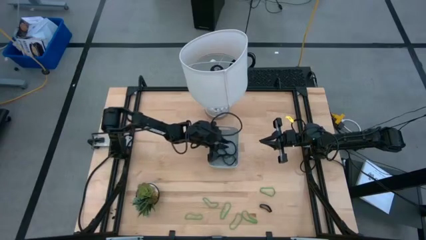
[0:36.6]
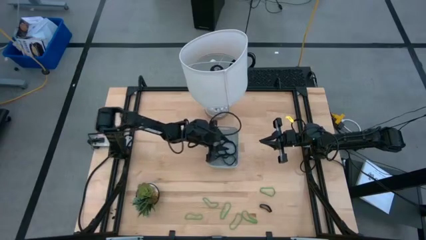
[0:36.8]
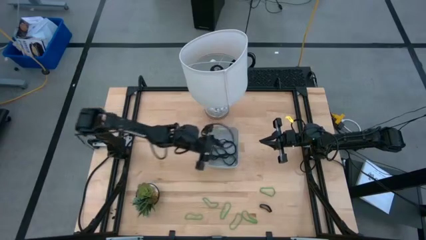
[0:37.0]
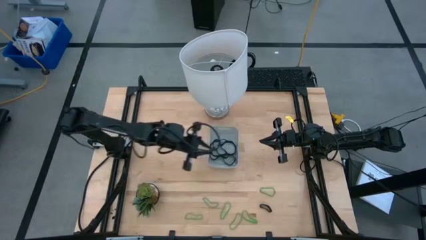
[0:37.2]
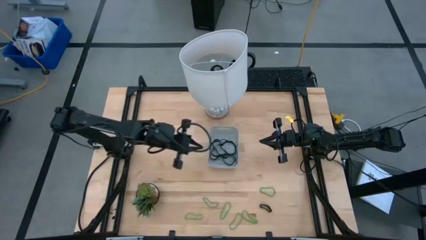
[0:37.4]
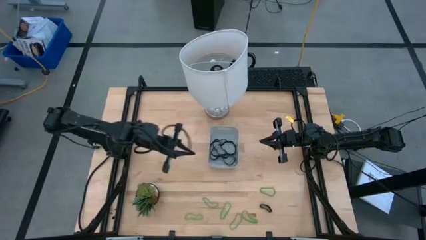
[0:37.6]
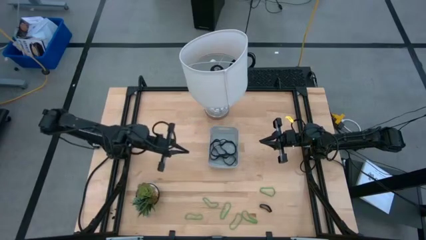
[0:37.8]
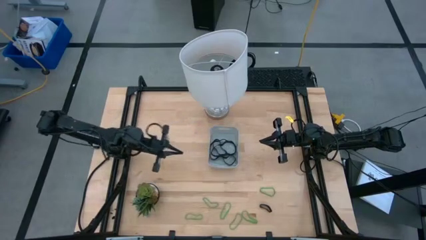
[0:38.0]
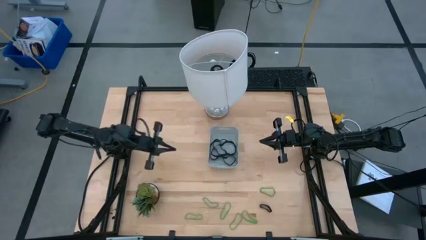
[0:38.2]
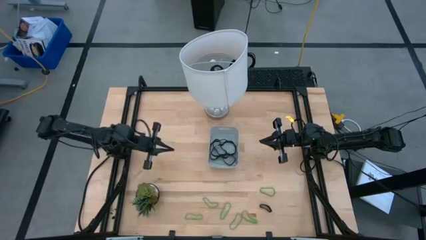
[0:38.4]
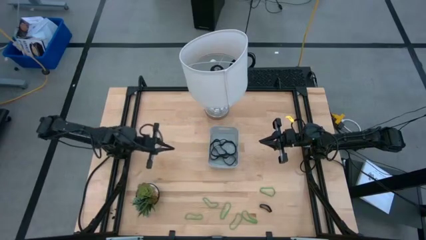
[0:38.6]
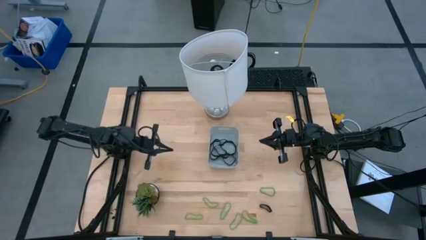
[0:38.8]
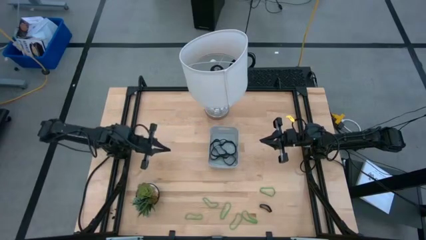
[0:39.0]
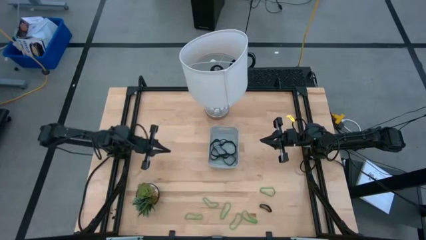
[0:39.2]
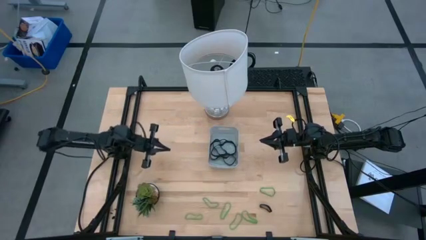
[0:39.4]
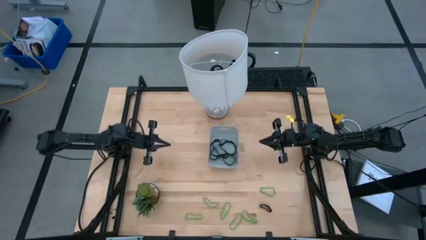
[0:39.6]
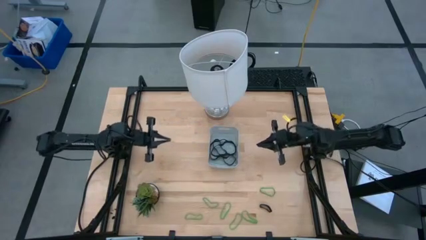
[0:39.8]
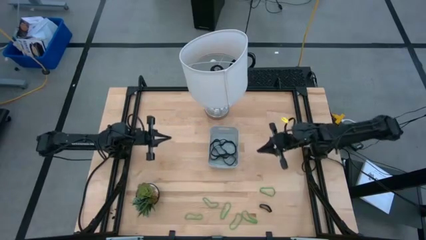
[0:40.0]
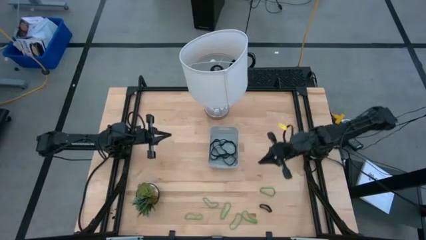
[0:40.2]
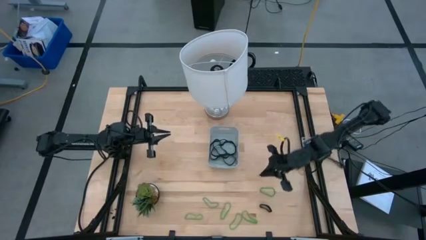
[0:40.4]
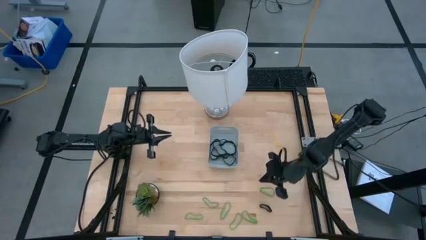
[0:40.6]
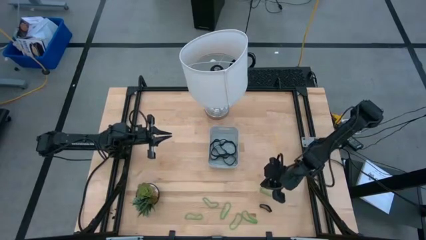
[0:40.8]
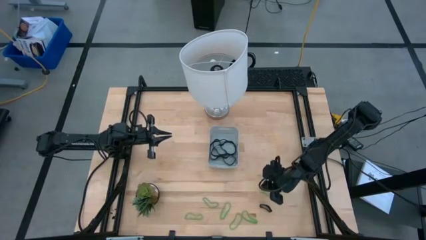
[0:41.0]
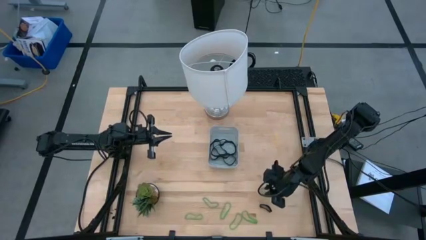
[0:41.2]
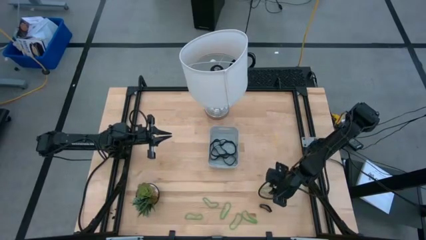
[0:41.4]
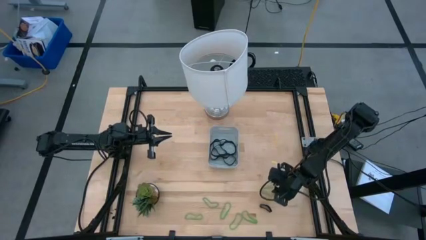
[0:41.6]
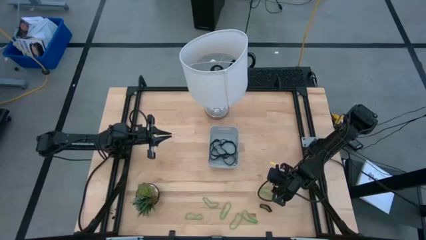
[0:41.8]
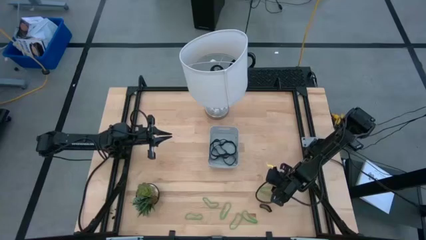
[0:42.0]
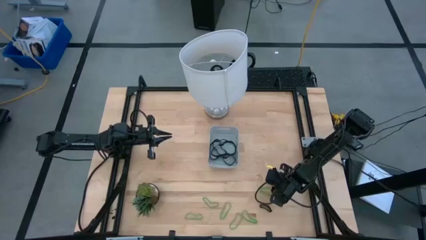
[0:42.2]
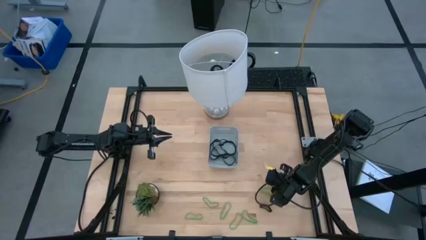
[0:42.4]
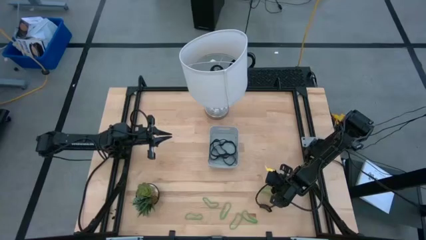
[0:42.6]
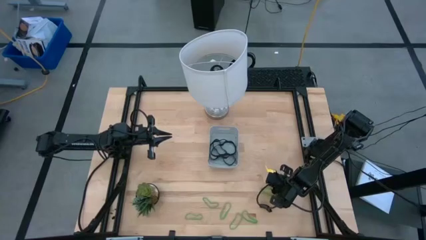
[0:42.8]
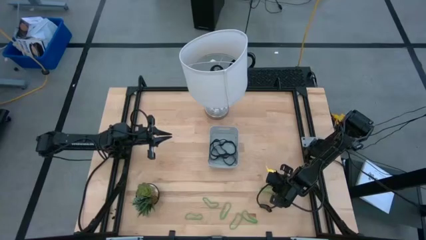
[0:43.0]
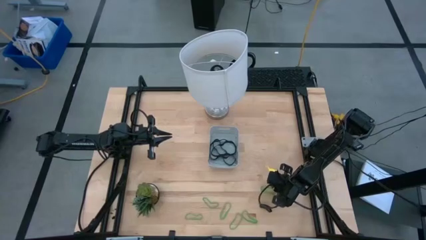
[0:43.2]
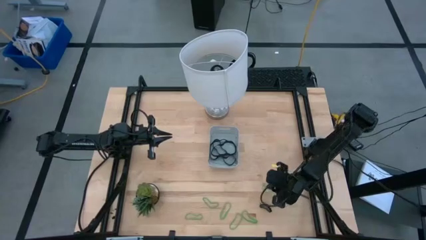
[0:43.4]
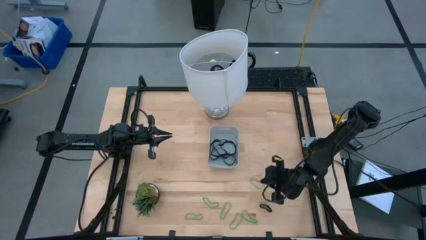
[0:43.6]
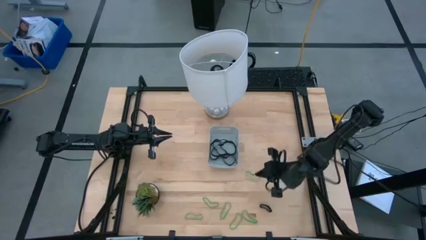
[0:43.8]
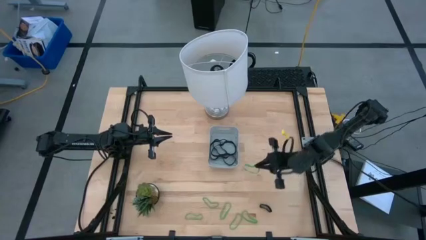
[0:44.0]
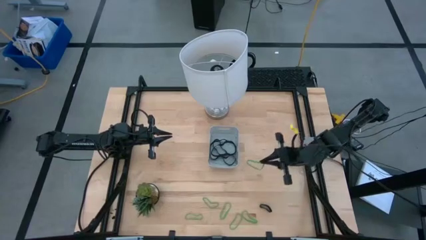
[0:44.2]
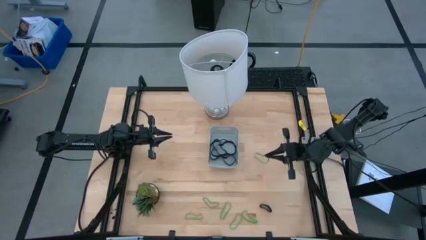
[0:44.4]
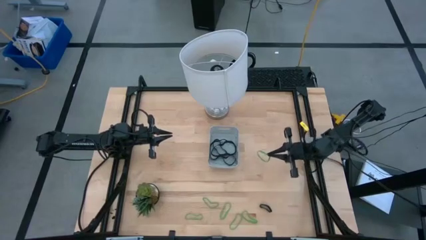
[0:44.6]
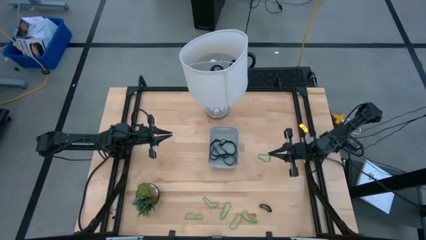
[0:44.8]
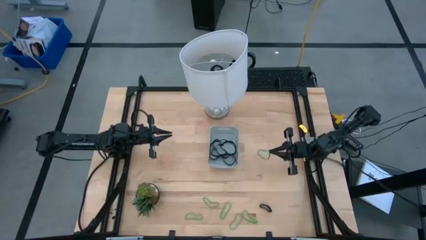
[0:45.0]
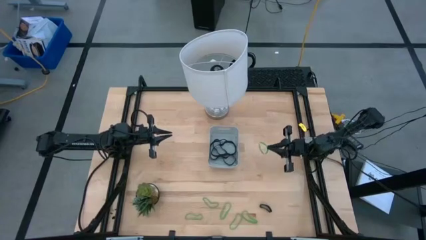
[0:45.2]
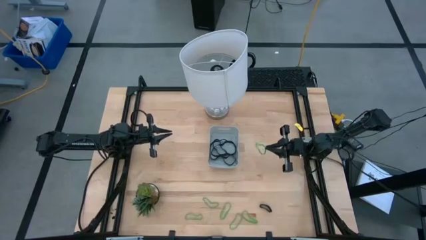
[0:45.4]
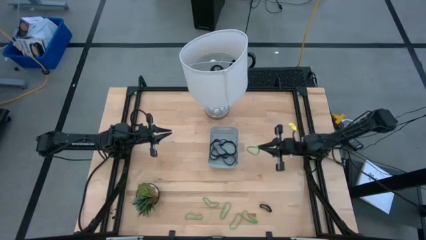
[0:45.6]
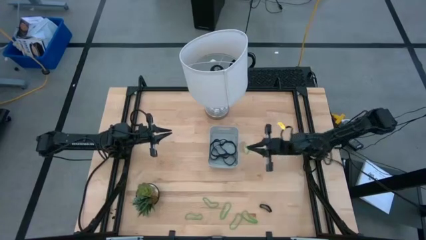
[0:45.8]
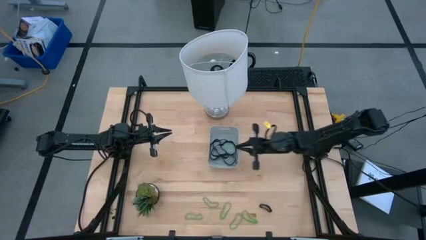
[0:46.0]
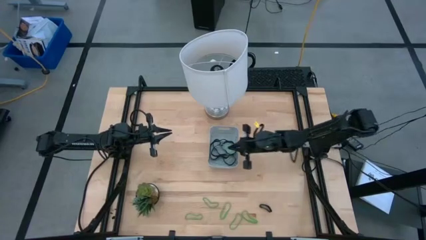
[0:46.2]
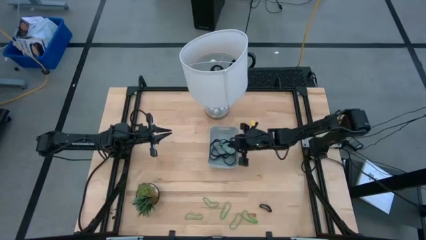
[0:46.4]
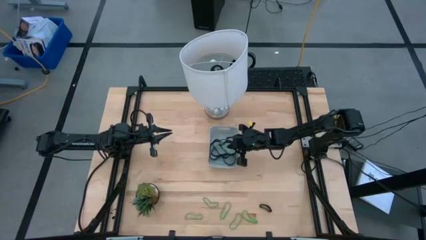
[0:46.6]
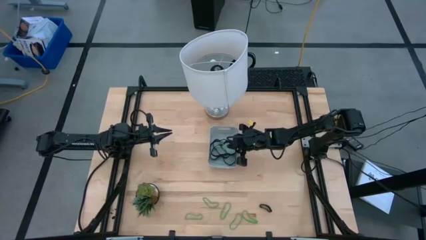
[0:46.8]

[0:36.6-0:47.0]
Task: Pick and place rubber bands into bin
Put the green rubber band into the gray bin
